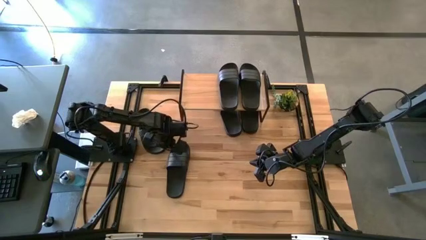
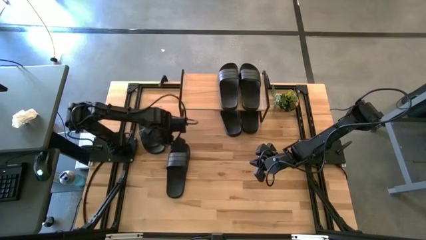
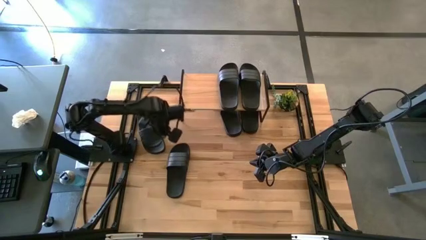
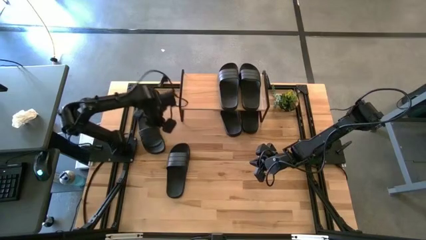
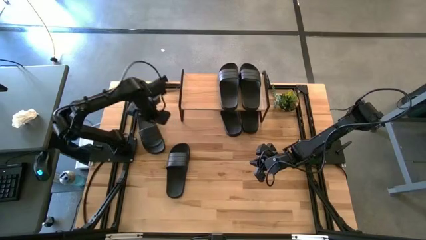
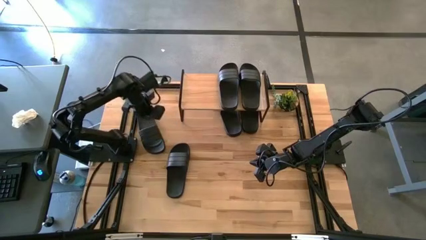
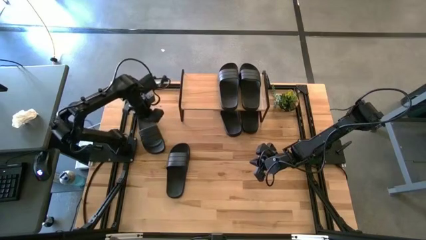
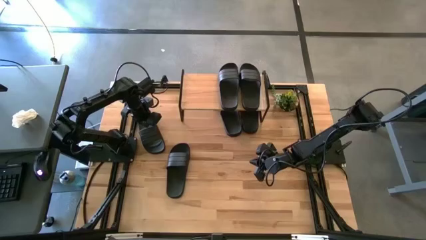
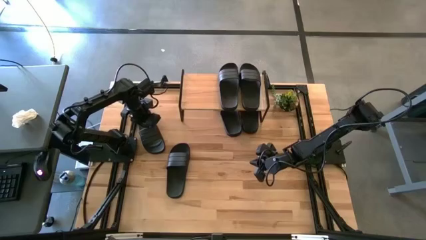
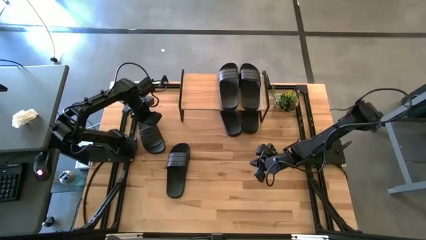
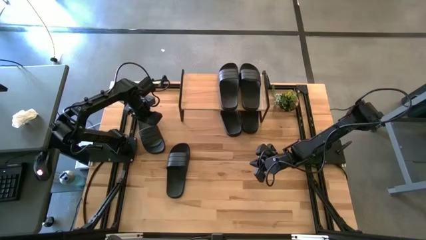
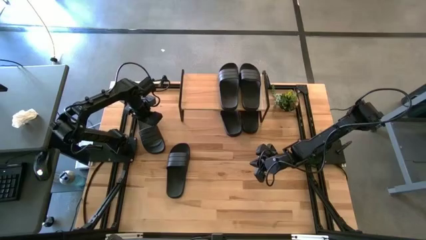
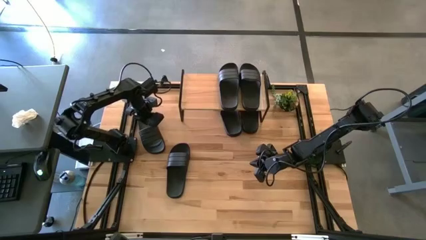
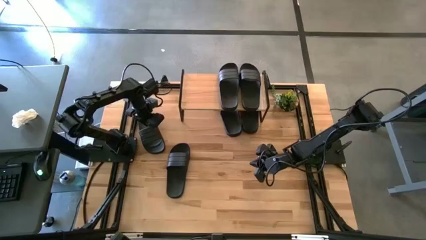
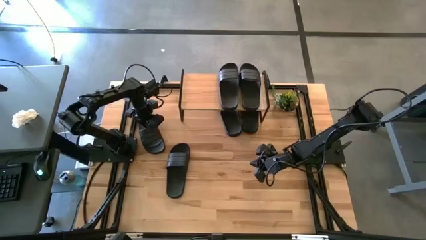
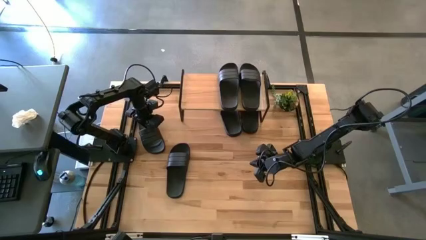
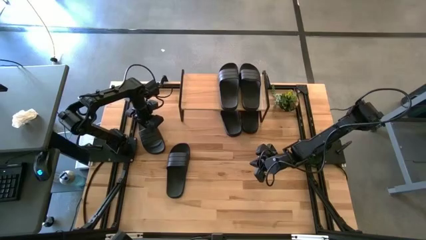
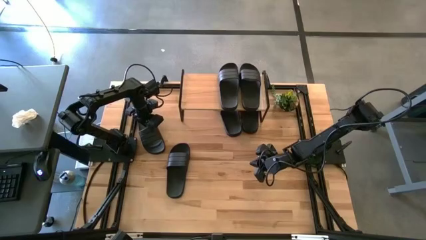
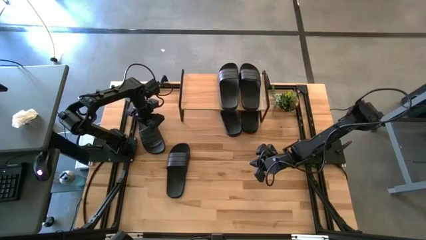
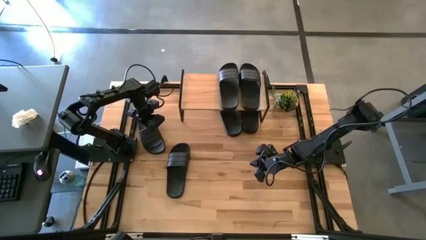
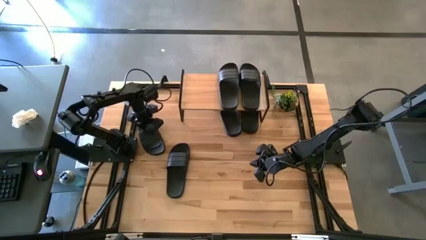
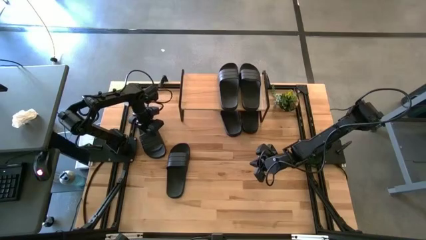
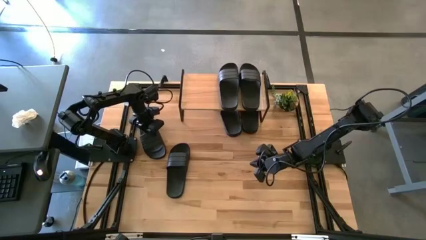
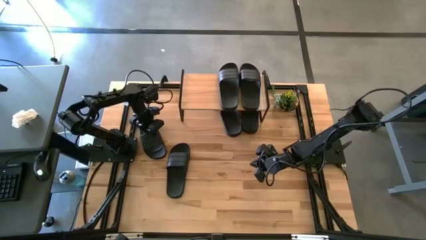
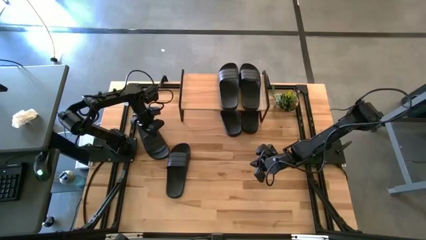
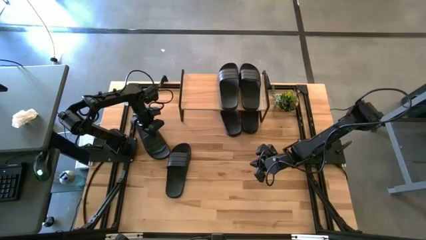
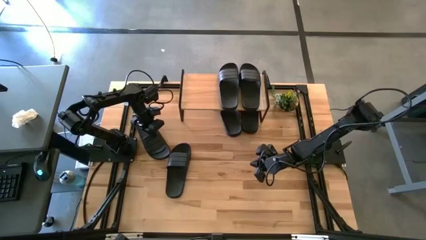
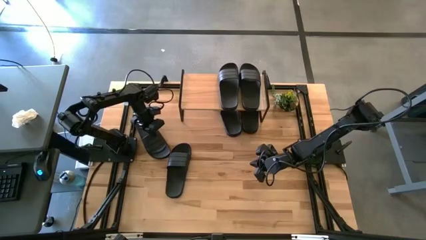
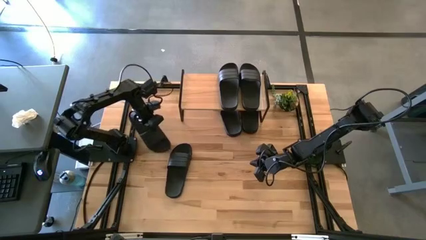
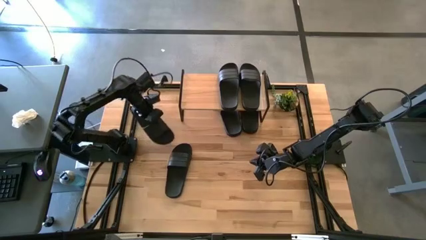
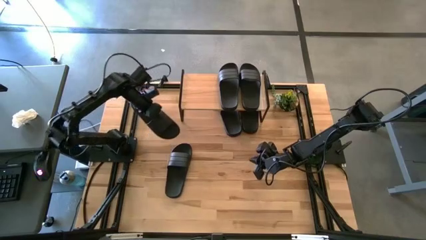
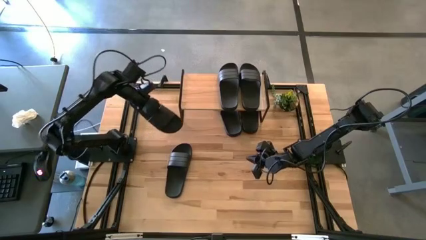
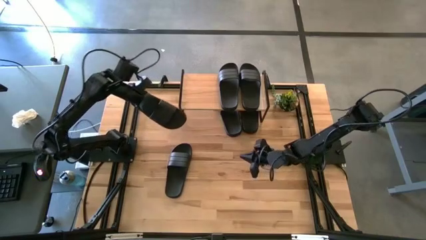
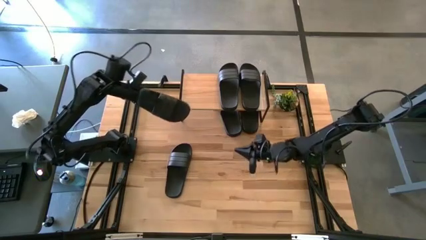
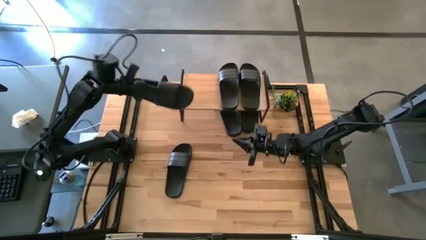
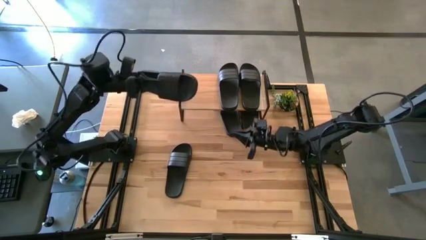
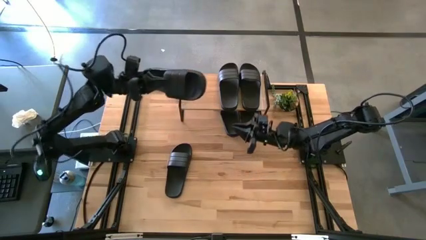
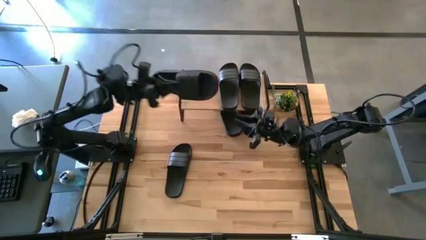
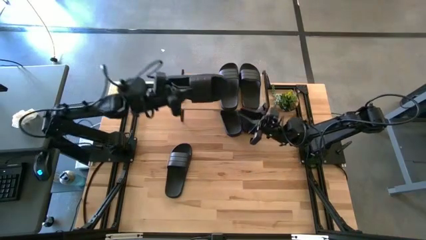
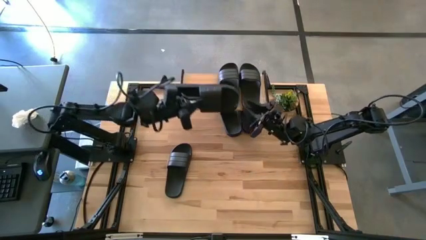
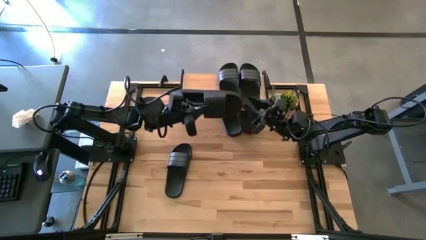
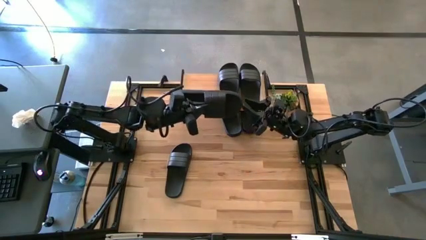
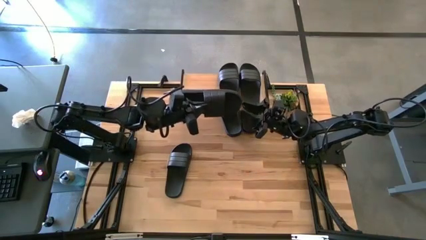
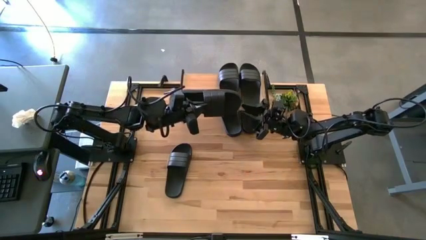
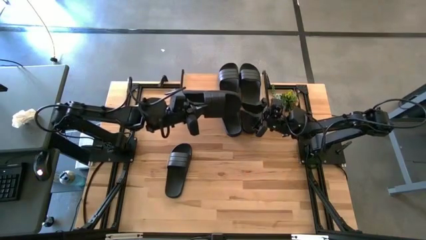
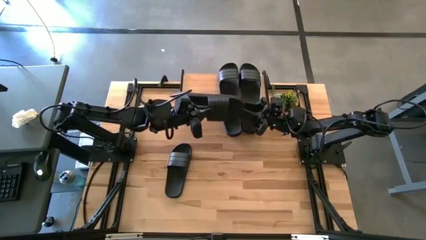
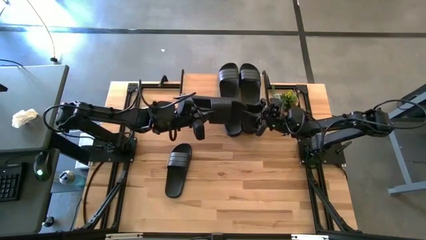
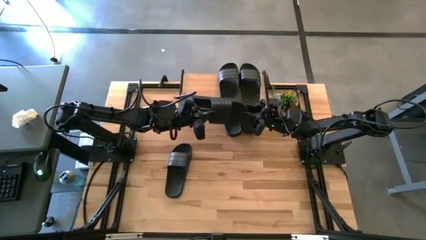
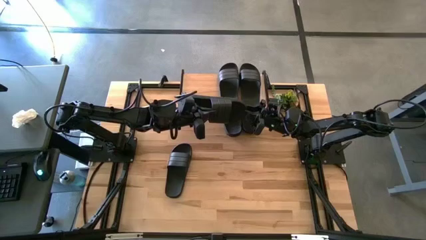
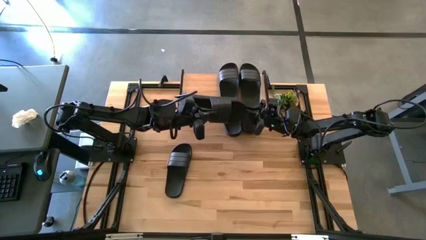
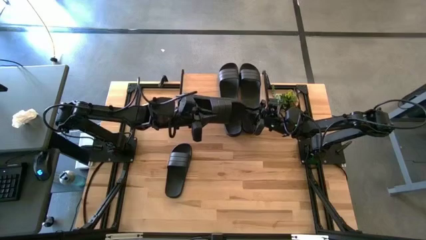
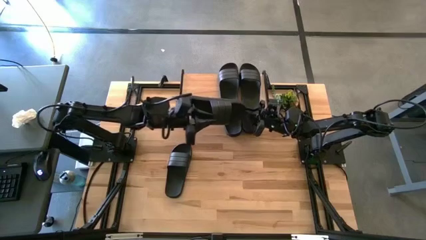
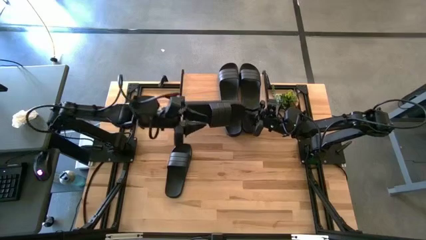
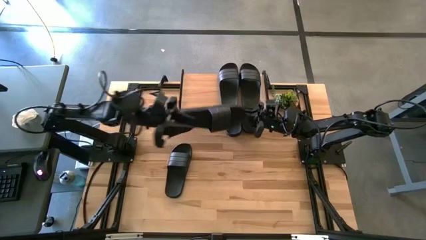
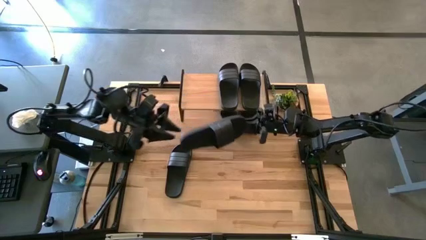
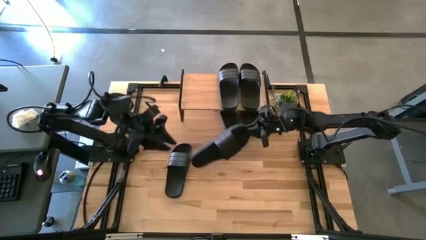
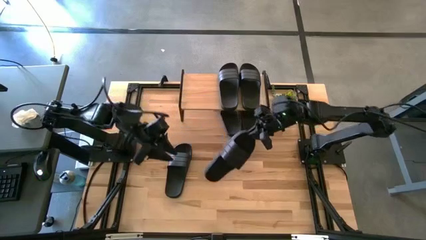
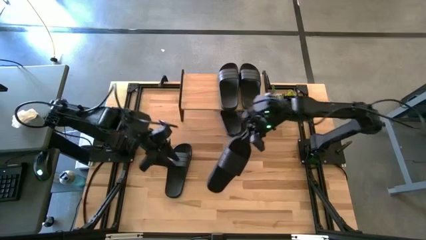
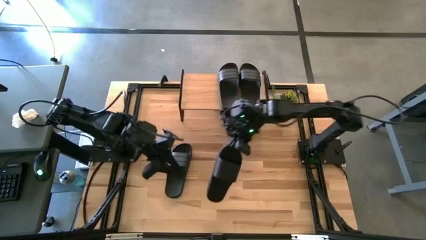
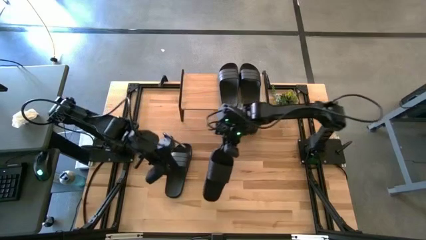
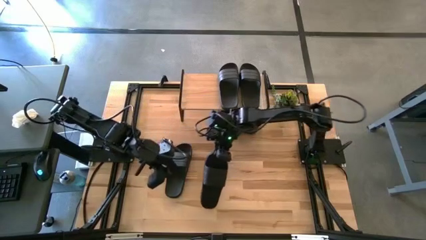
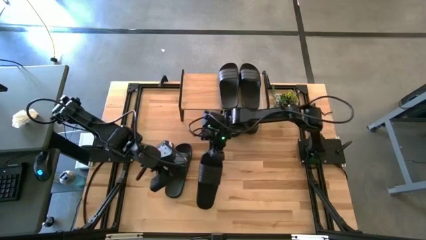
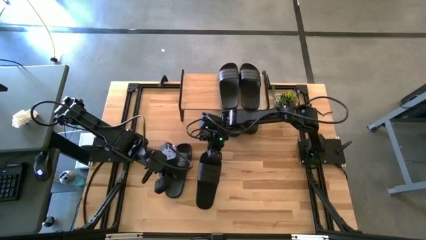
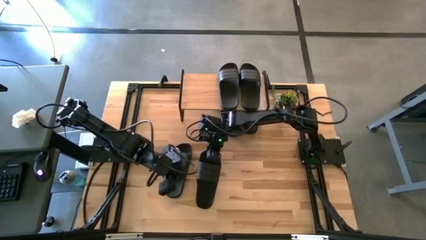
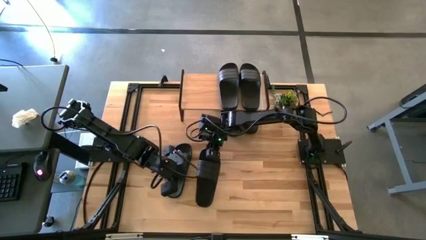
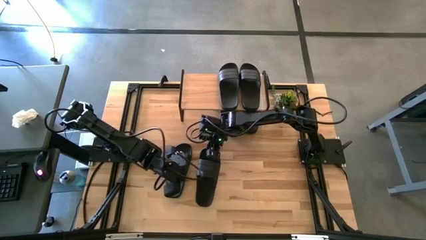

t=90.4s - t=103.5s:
Task: Pick and place slides into the shelf
Move the black slipper to the middle of the table

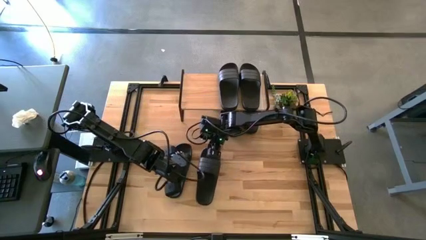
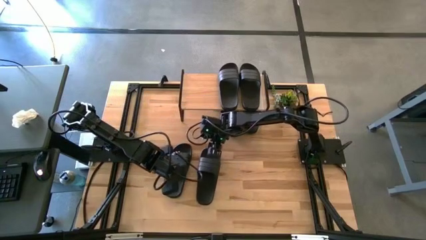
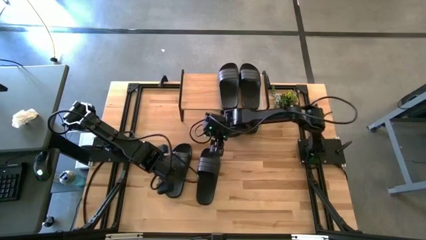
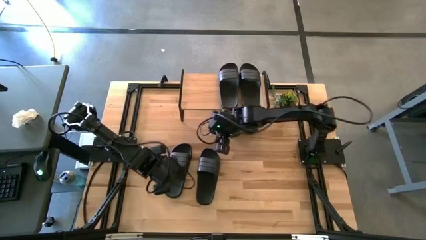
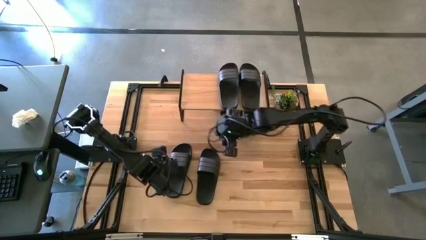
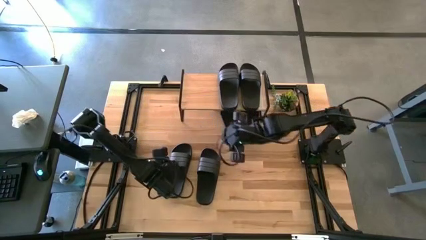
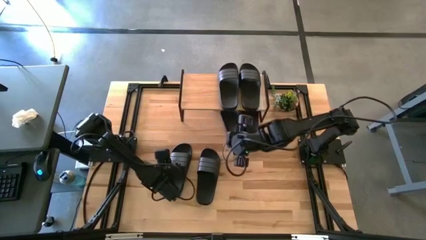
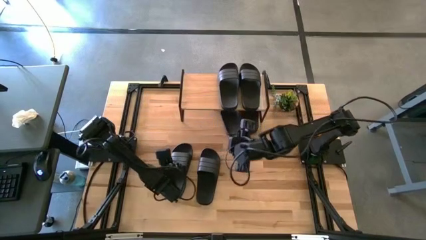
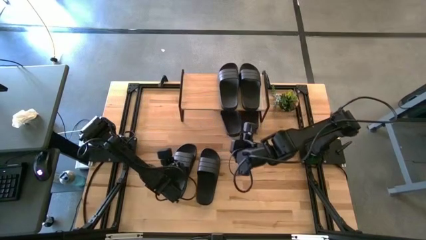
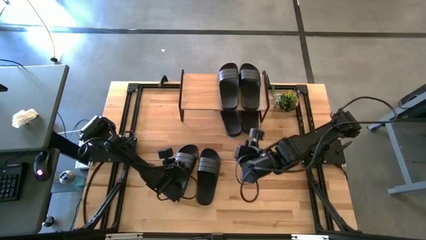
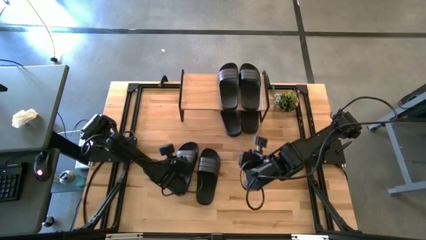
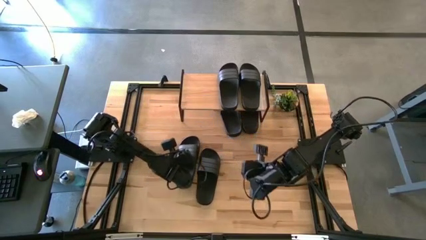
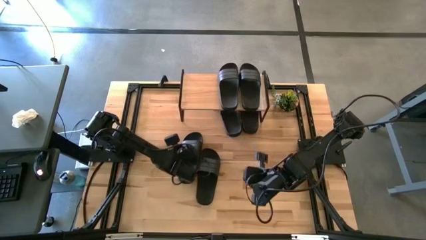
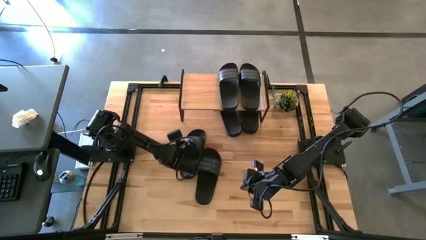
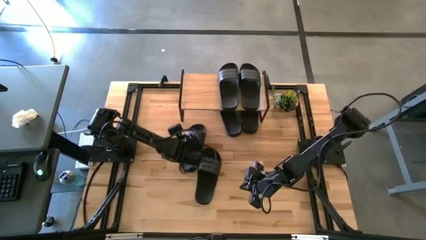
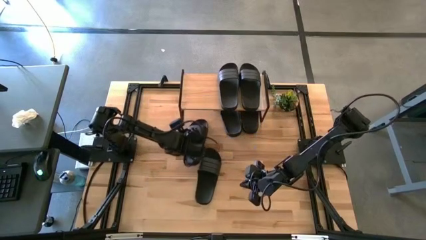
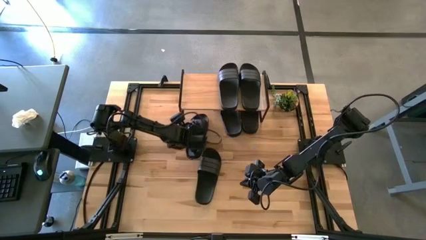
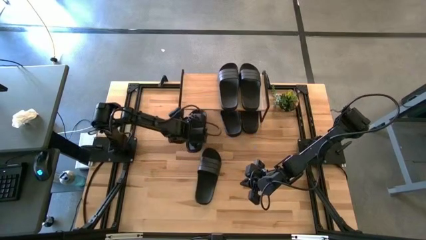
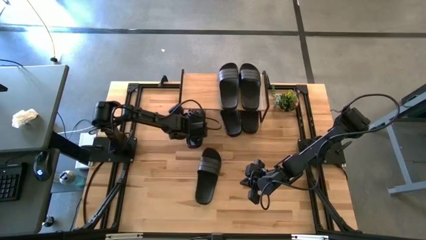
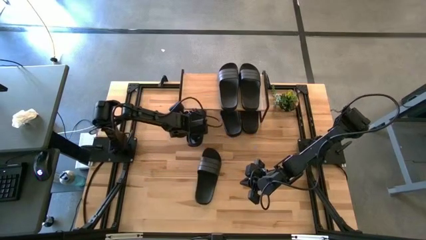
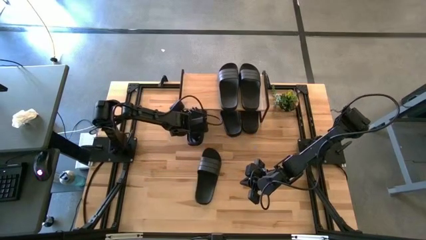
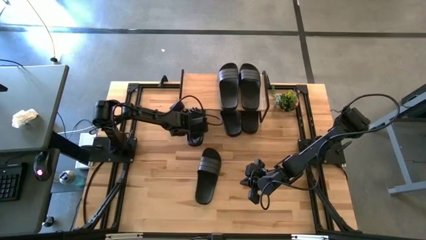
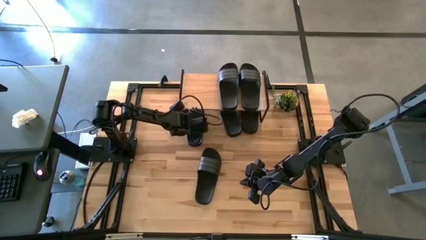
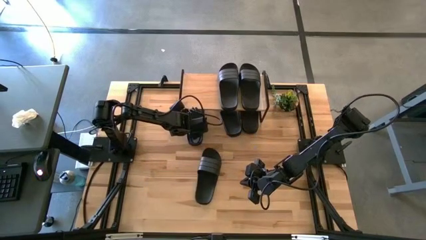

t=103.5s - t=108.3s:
Put the black slipper under the shelf
